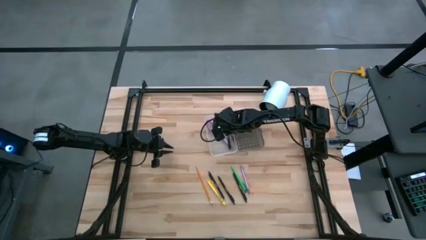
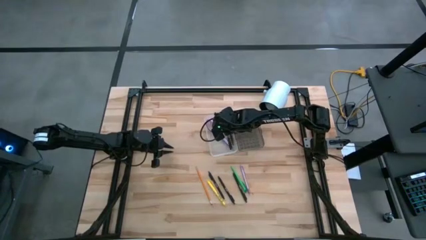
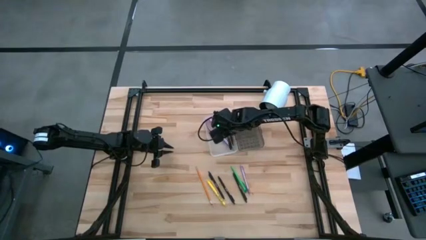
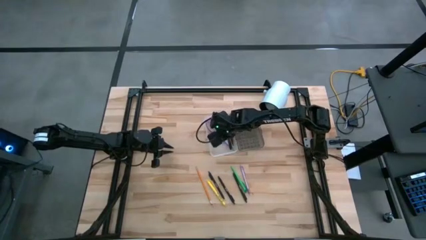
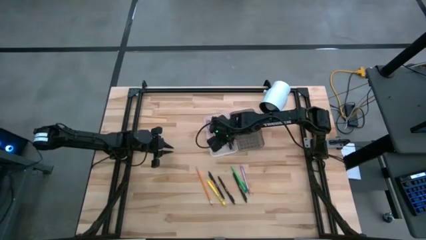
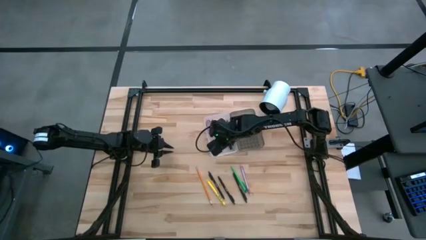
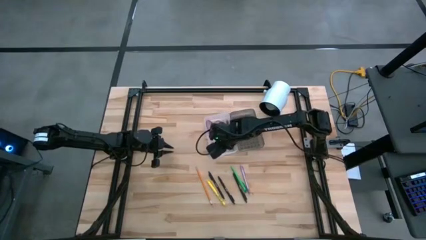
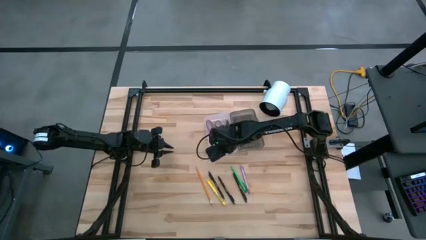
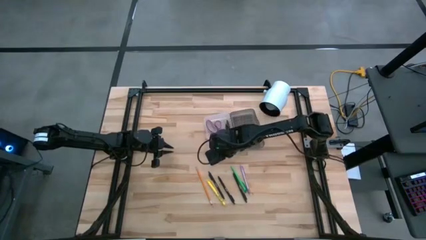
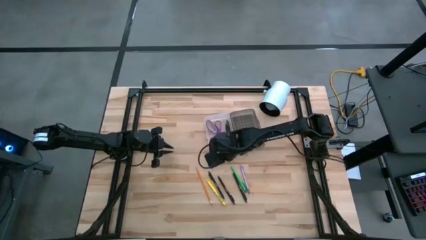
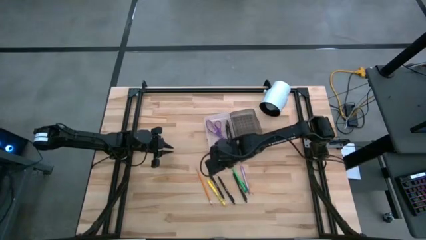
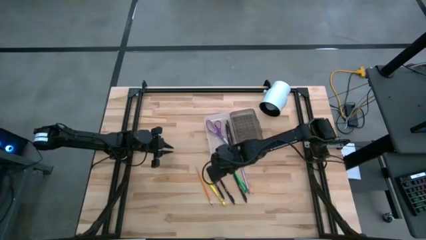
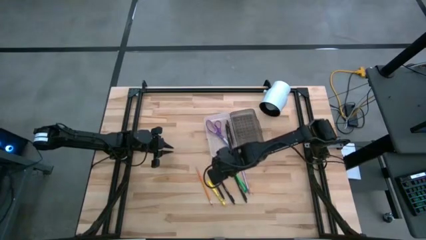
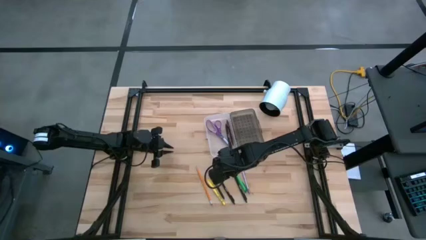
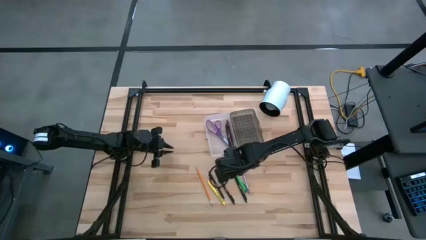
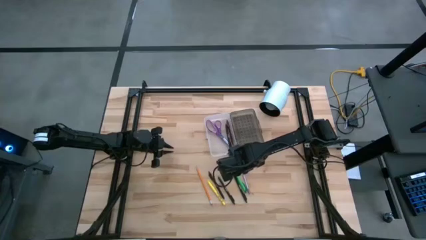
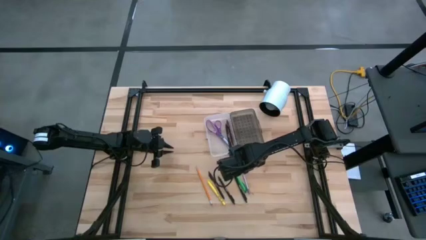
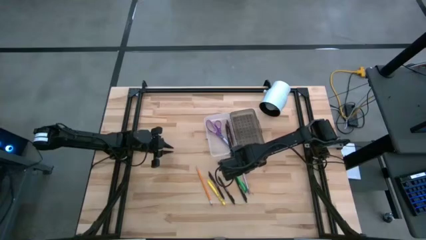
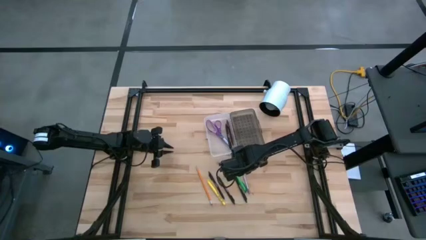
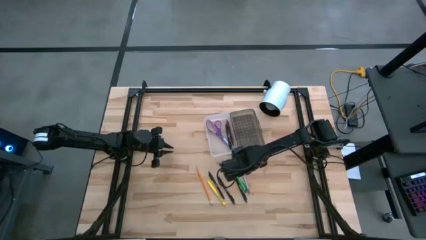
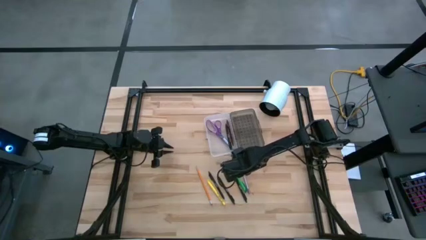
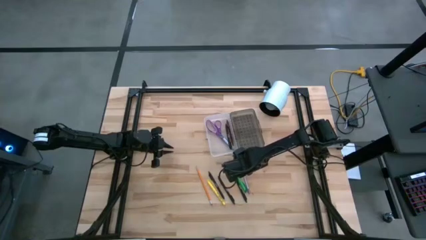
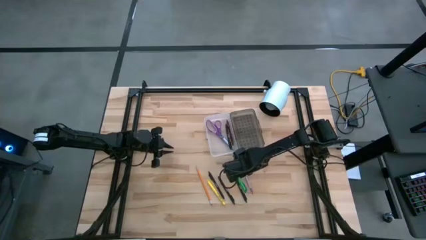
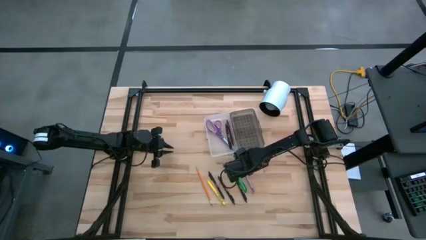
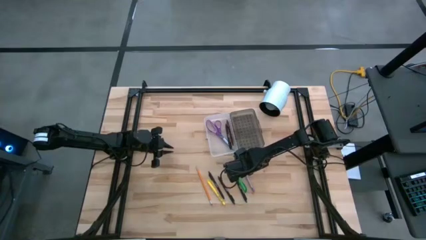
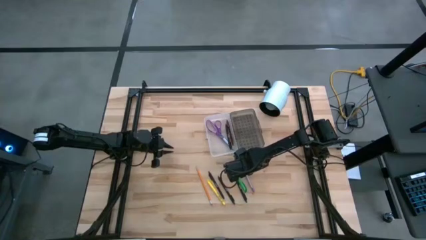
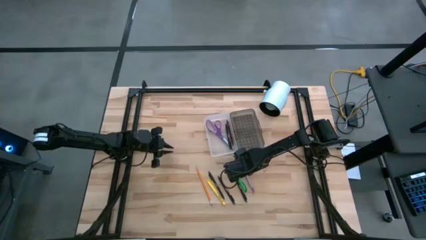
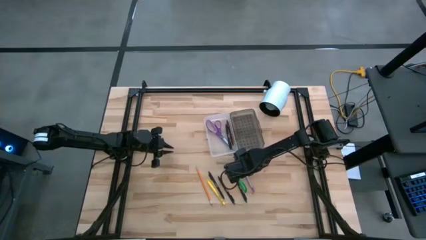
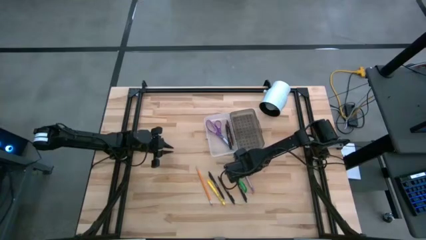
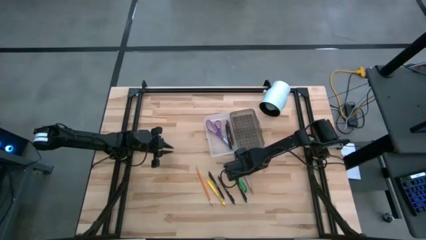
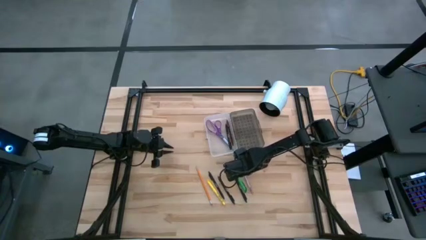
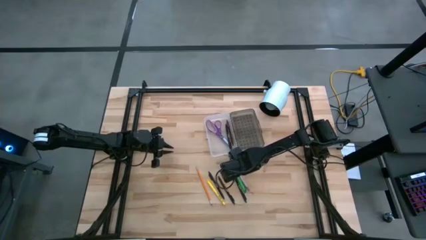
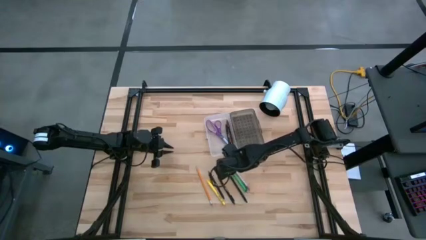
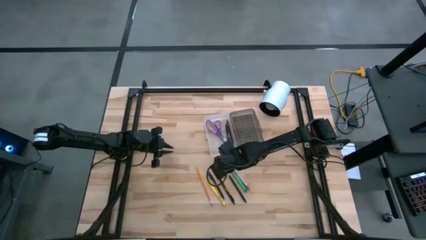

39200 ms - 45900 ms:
Task: Pick & place school supplies into a supply box
Put the purple pen into the supply box

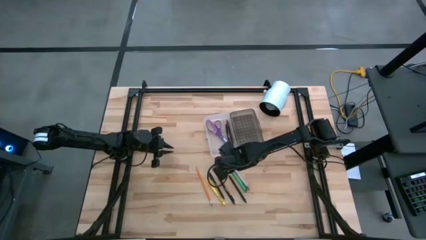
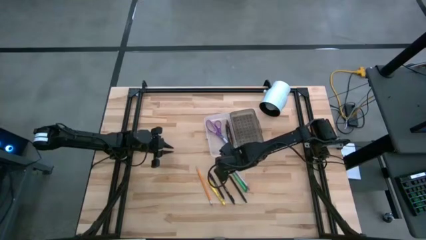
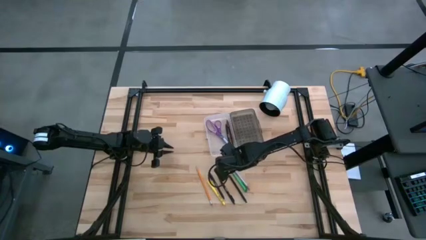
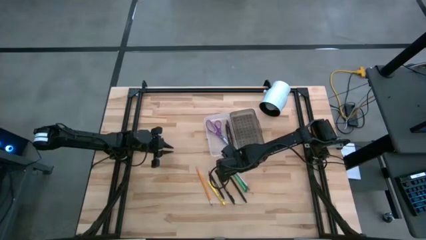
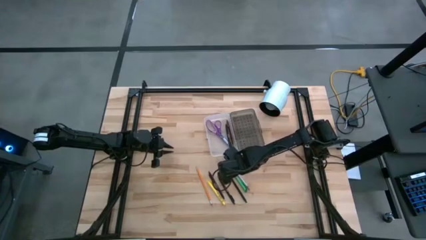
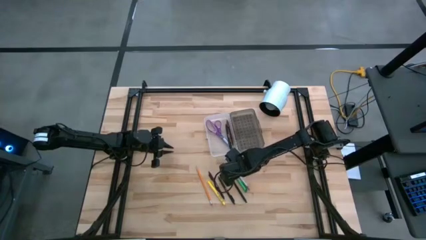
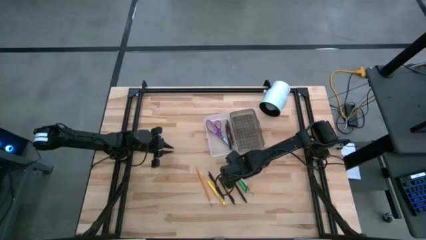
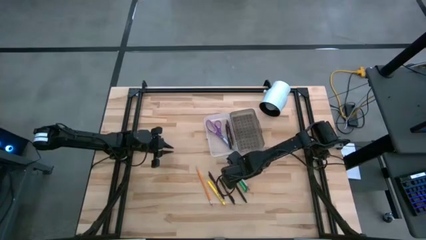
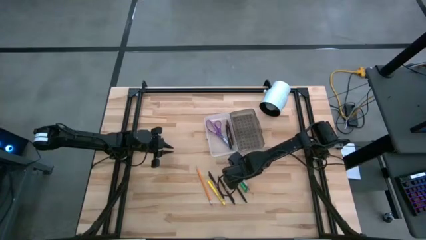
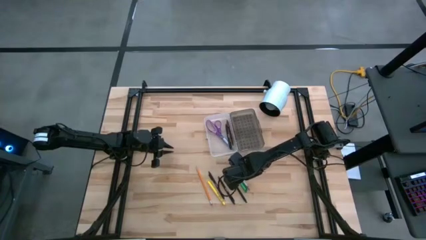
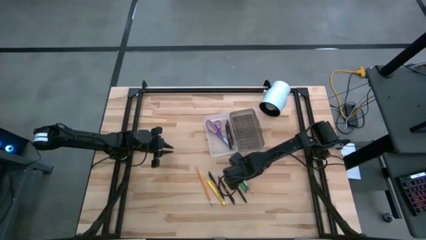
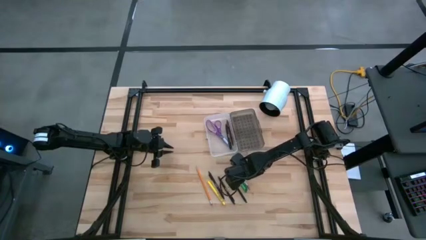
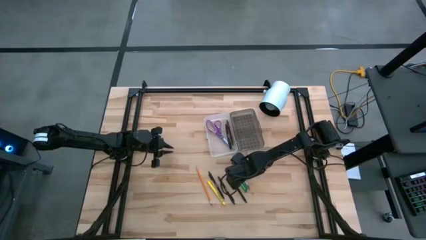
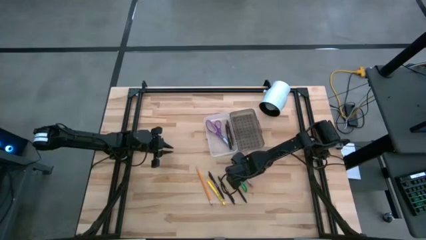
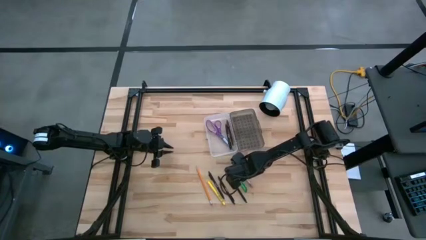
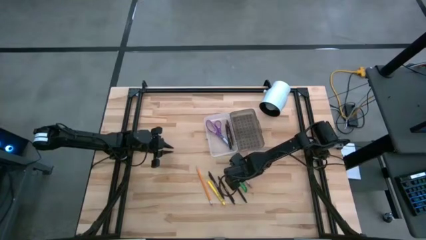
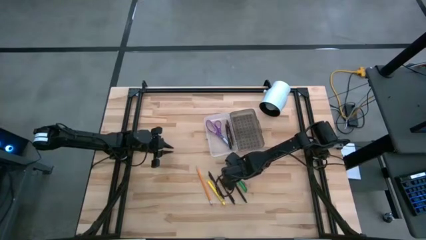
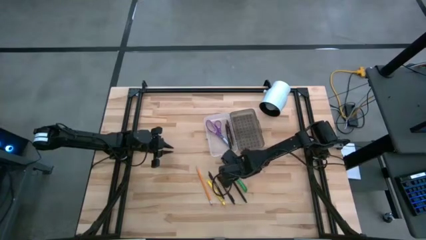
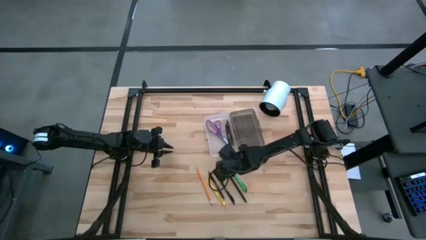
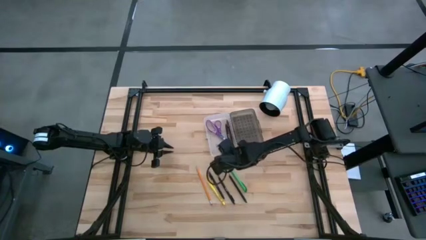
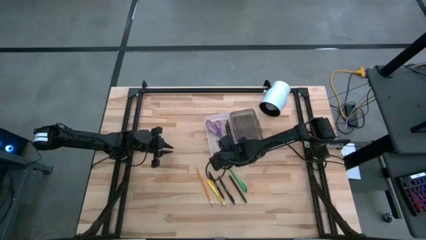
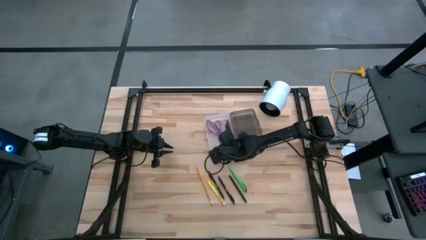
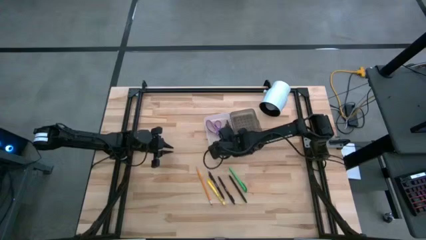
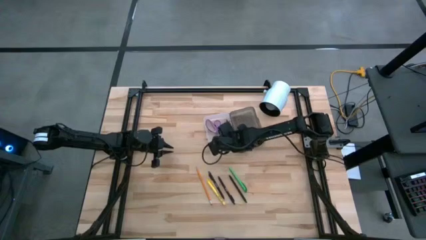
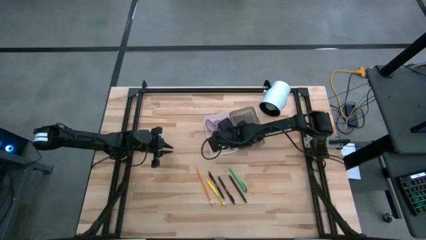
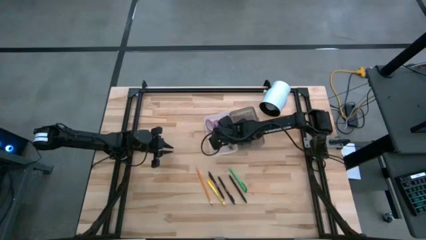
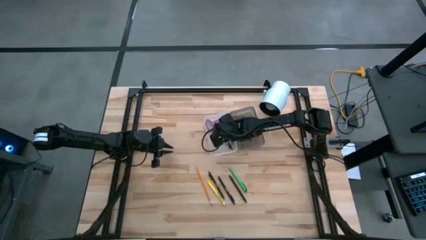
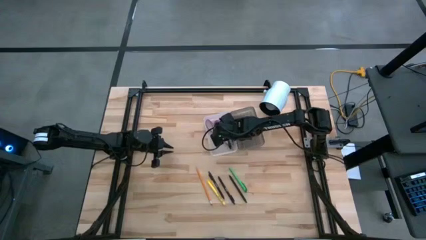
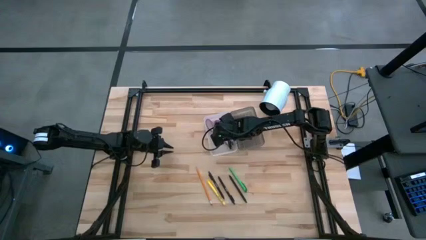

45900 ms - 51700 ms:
Put the purple pen into the supply box
